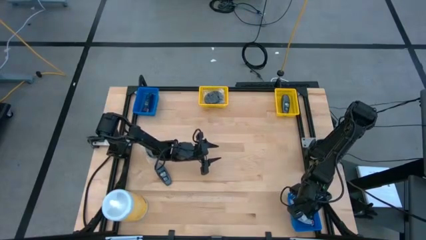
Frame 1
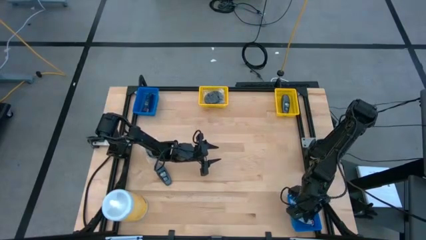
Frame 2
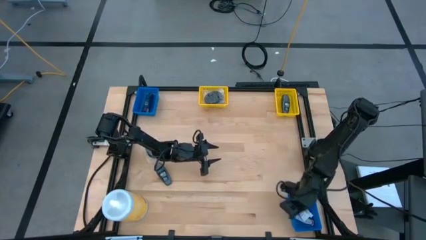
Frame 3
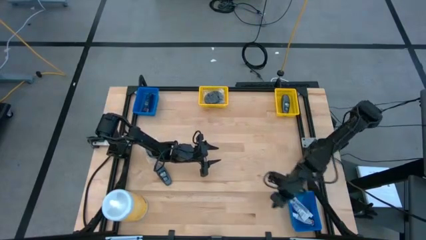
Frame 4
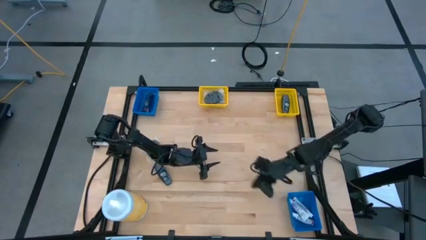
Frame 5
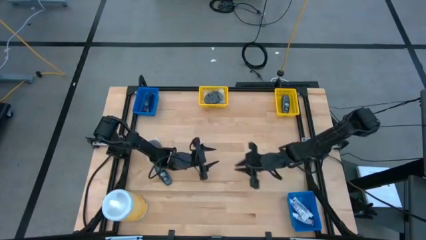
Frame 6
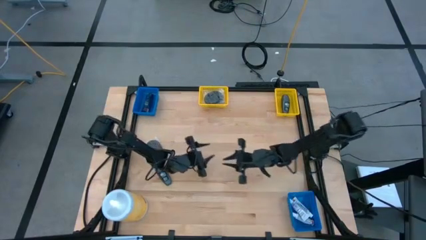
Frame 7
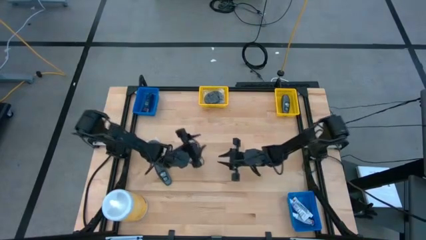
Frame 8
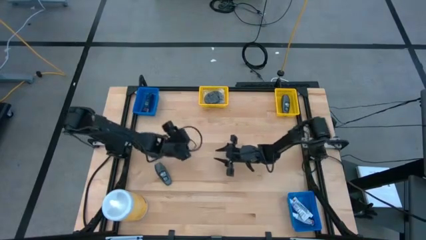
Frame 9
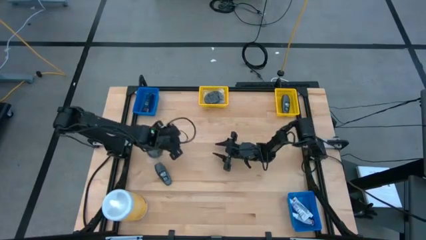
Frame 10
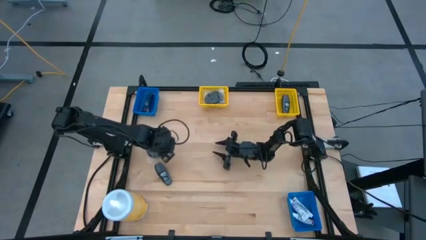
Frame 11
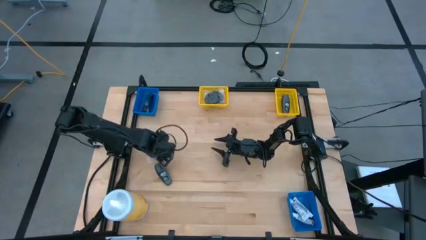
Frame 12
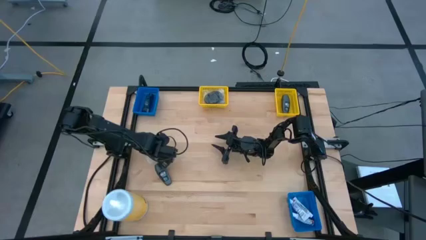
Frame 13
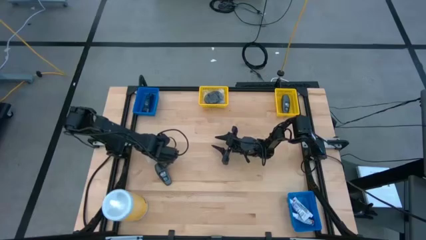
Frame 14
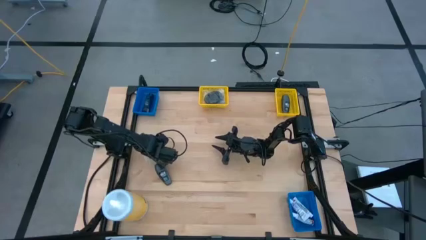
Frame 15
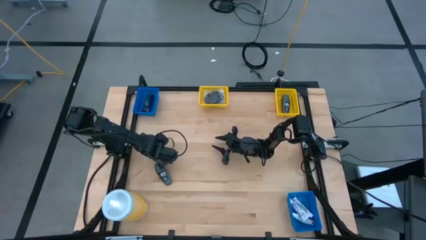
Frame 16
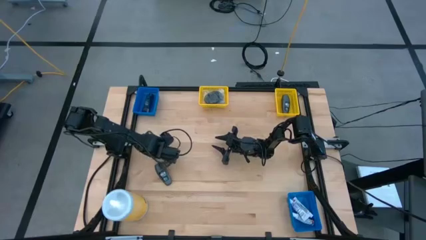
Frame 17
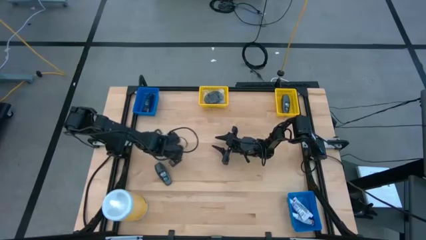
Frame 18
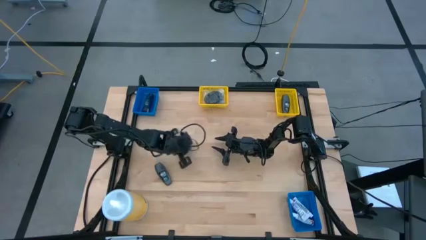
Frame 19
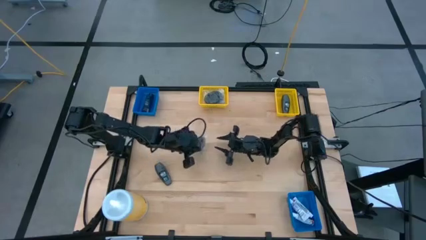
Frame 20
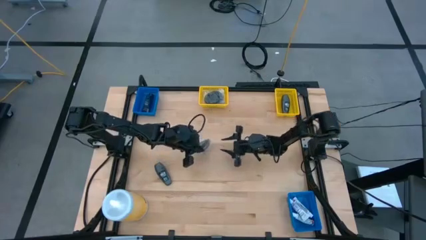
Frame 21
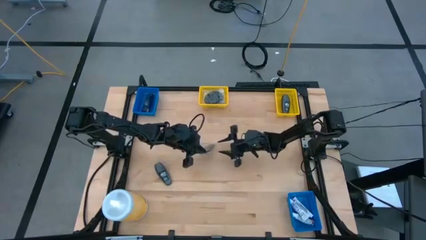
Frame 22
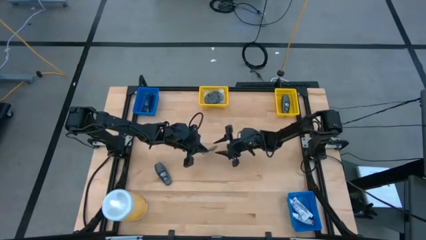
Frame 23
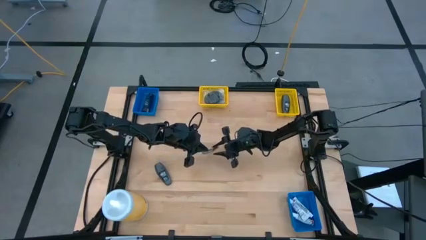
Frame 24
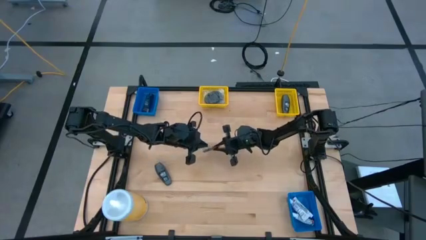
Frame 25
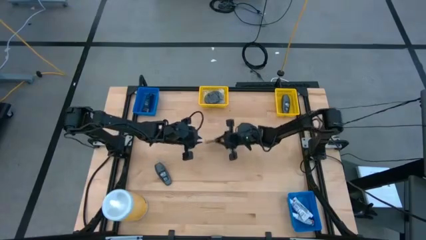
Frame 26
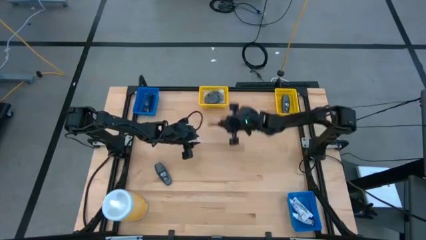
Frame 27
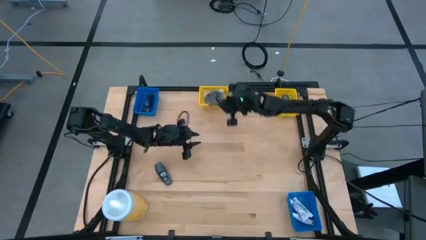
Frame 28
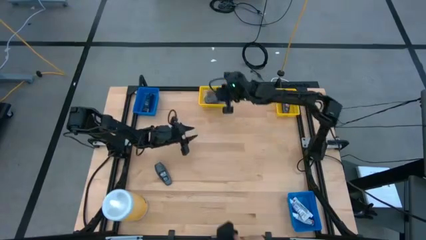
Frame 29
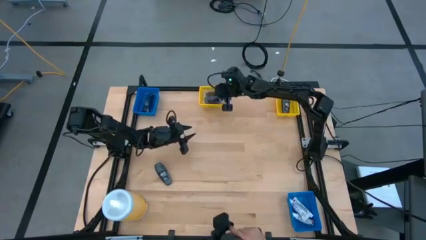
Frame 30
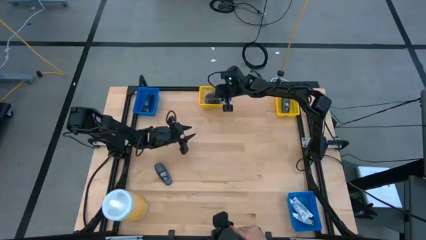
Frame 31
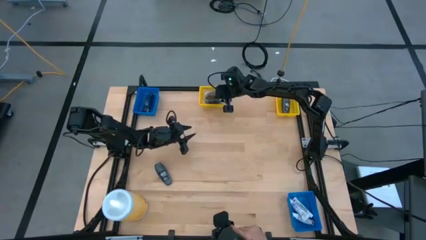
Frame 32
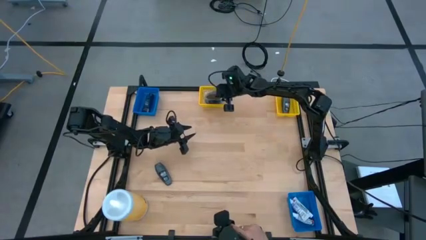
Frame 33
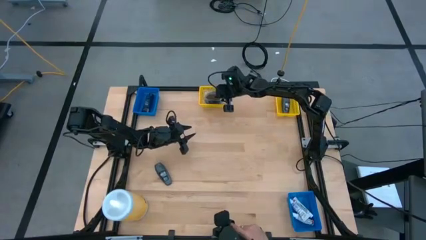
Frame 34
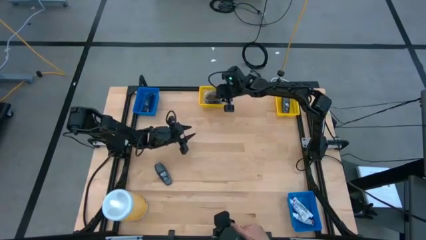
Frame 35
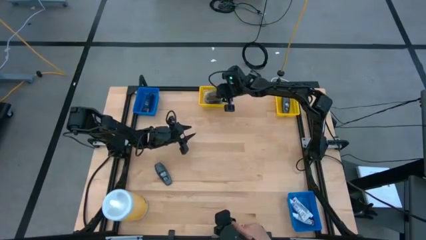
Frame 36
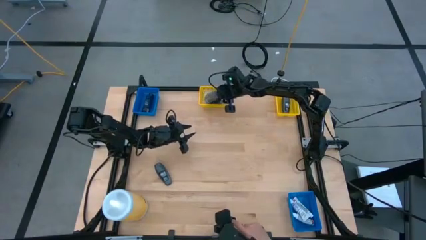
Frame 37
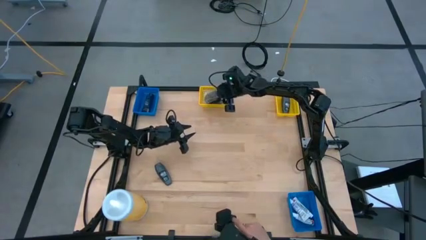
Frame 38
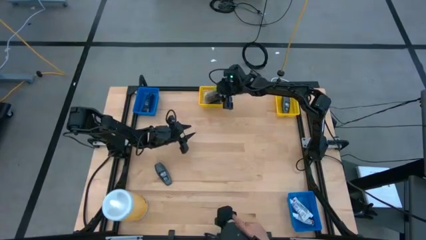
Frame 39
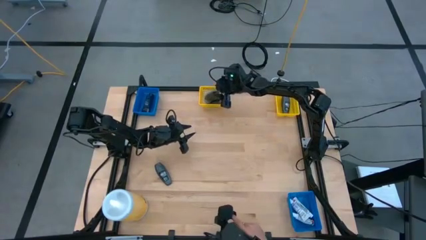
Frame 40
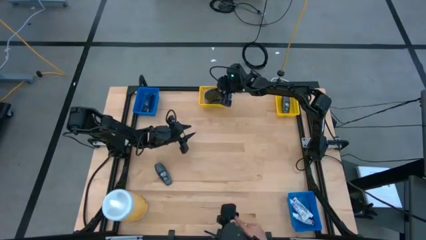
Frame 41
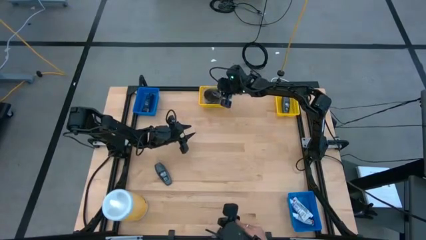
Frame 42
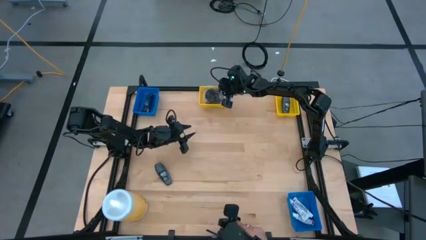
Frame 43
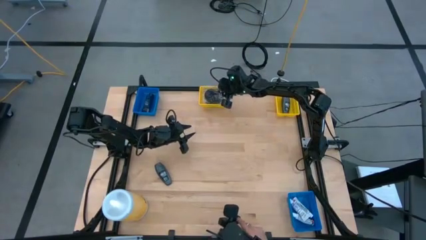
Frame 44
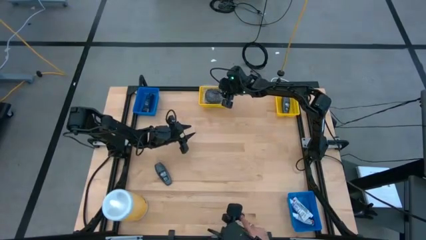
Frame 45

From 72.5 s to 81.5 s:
Task: Pick & Place Travel size toiletries
Put the hairbrush into the left yellow bin

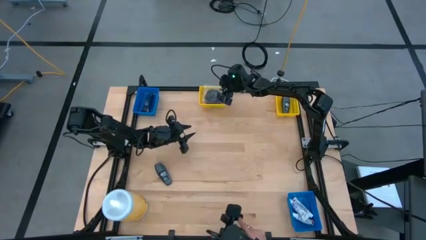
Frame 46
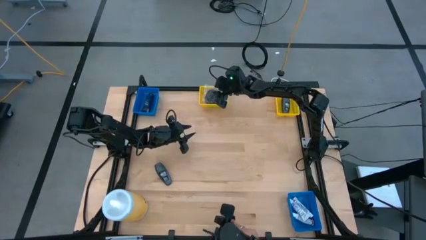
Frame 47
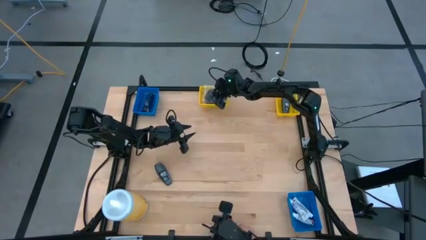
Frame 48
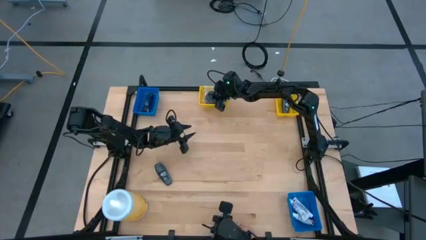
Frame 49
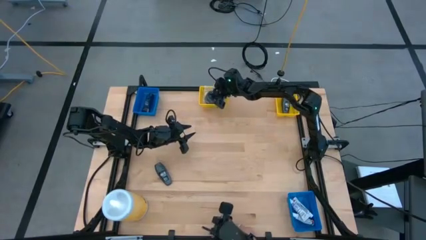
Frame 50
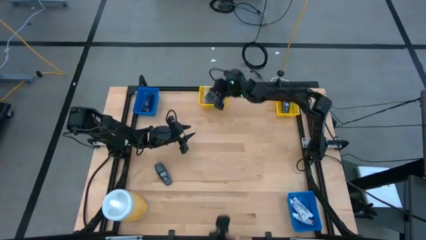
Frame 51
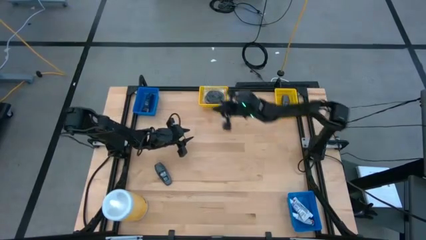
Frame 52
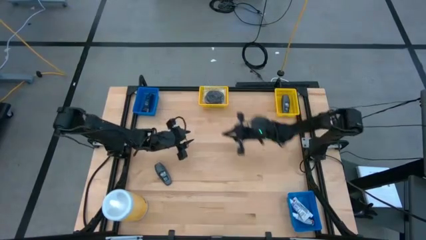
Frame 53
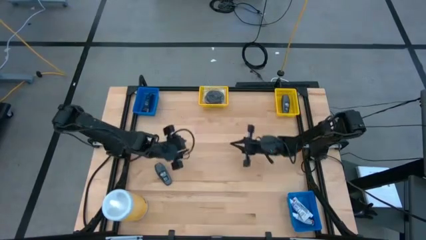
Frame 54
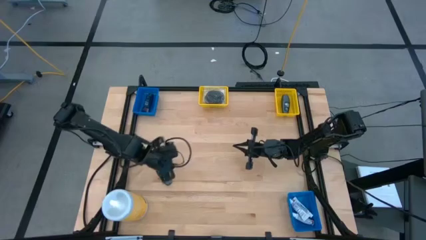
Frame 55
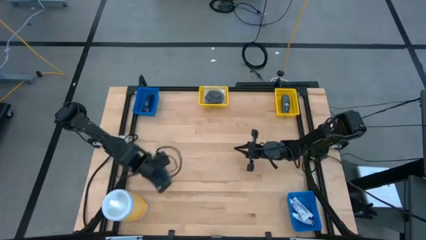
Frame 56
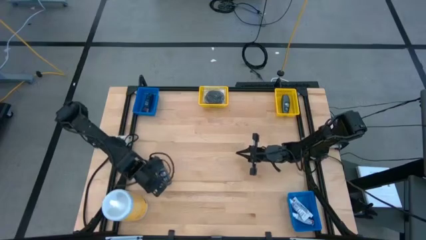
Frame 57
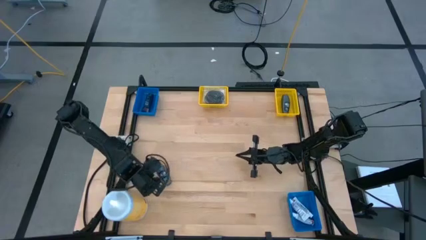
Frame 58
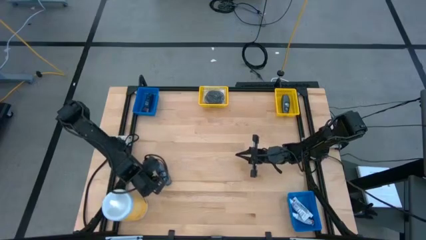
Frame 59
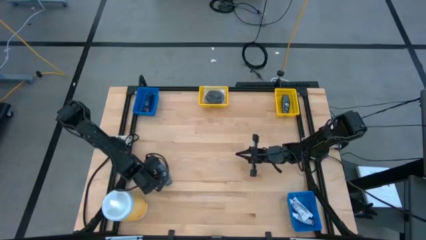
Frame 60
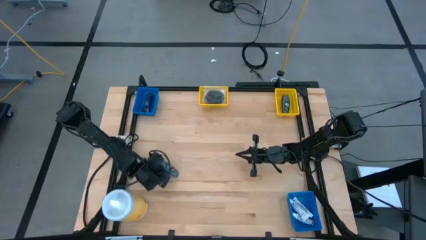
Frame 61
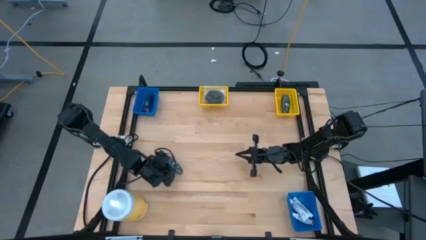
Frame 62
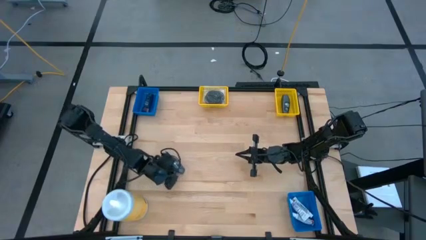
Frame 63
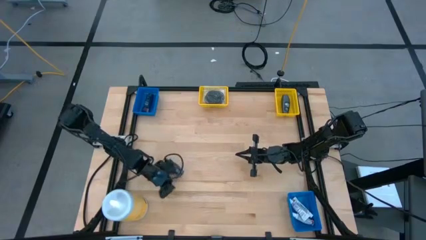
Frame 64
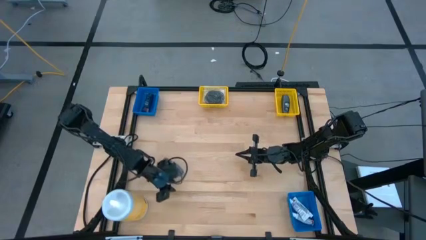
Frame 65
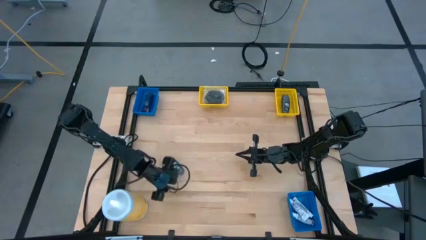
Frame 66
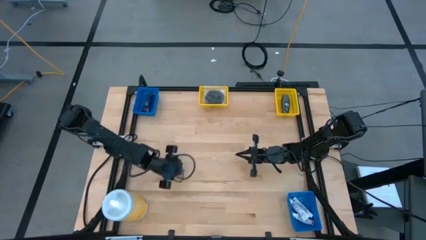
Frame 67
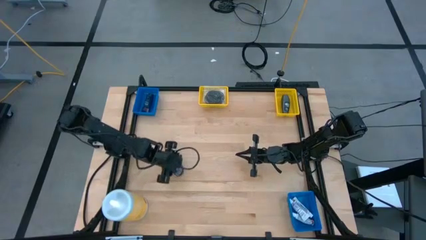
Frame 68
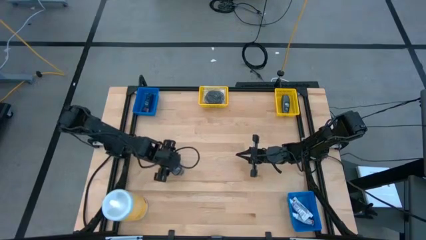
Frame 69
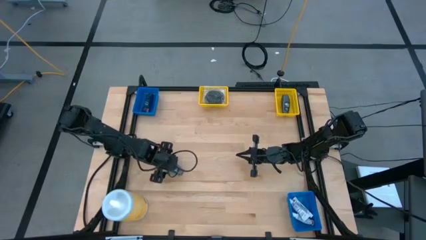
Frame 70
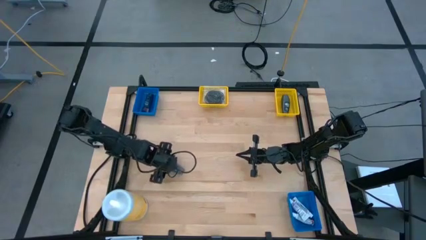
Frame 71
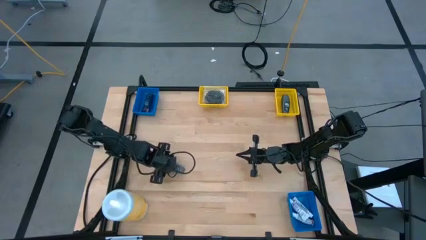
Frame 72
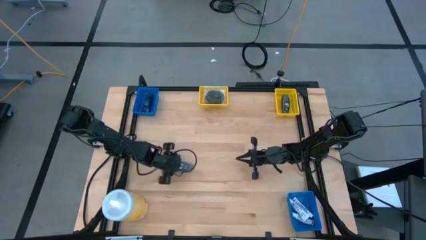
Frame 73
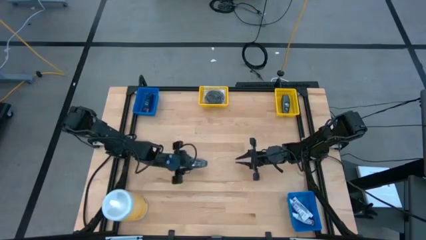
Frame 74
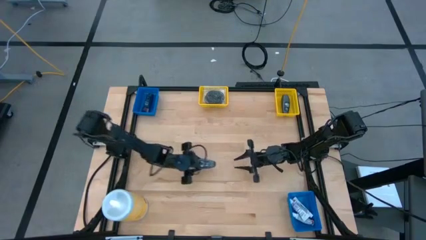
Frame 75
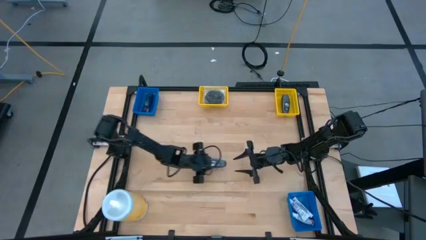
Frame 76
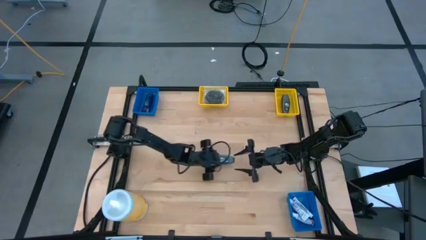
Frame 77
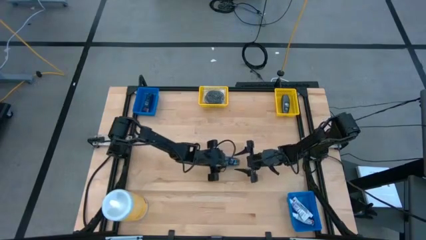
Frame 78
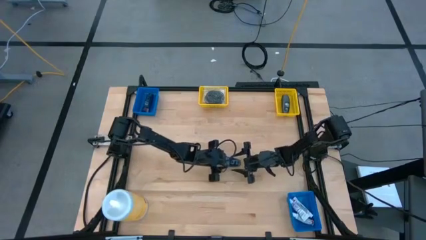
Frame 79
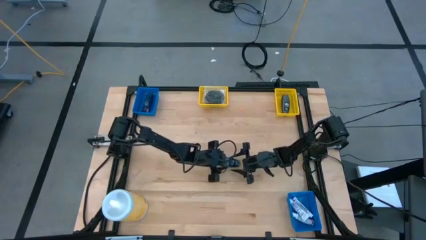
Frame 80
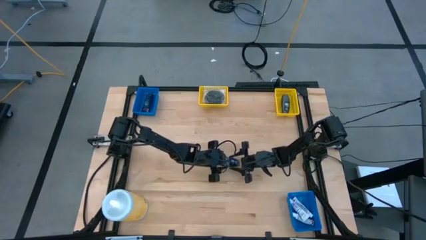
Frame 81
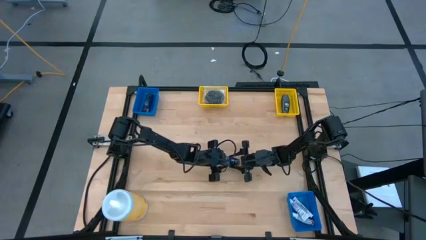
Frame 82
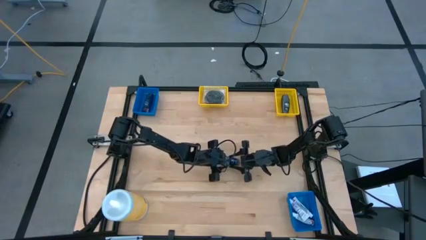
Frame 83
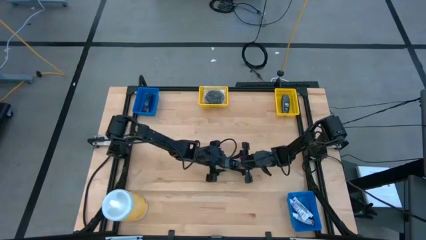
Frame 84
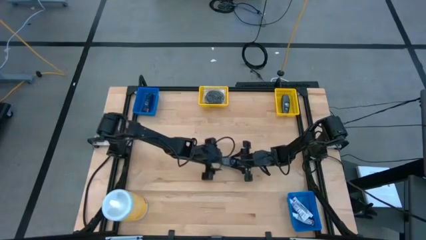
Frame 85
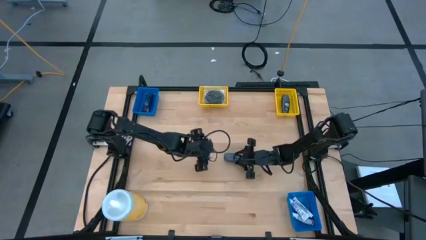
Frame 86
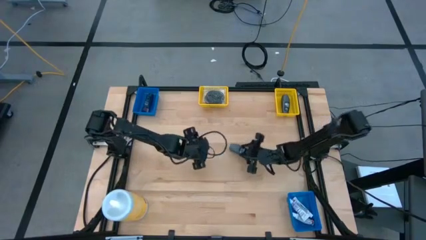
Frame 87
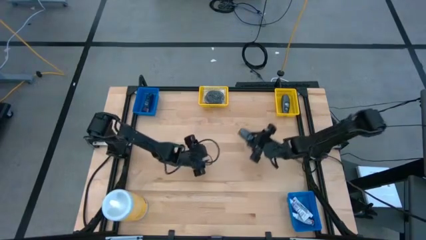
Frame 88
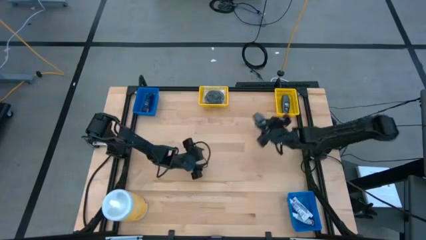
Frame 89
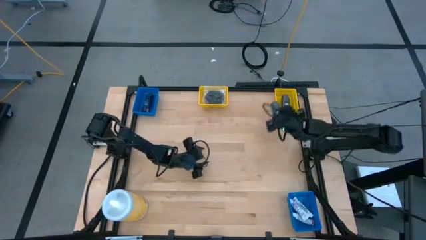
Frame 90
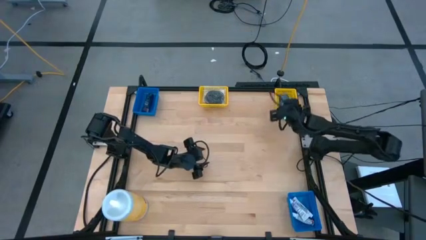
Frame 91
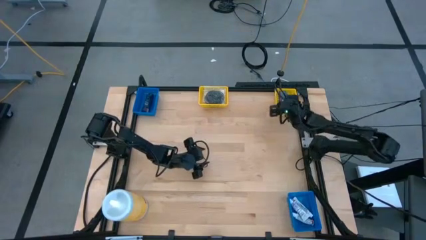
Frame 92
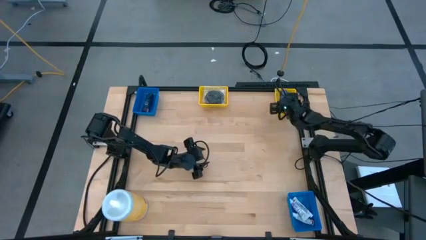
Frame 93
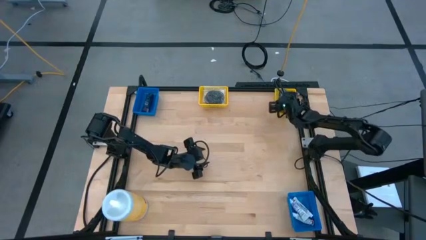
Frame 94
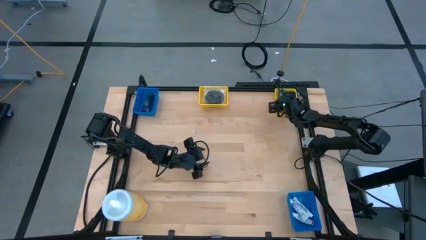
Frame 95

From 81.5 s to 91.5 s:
Put the deodorant into the right yellow bin
